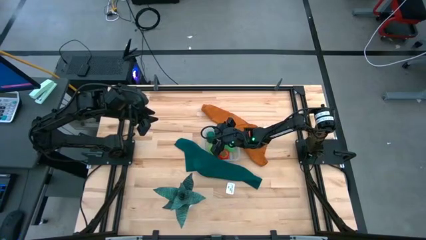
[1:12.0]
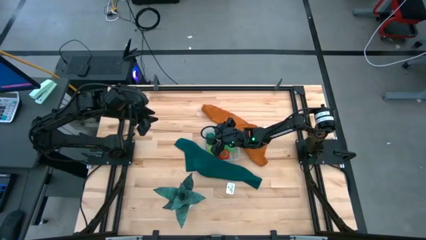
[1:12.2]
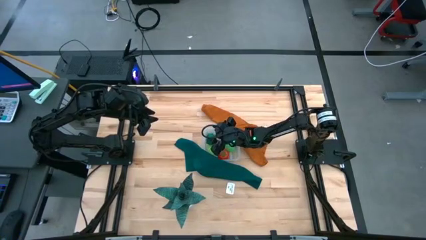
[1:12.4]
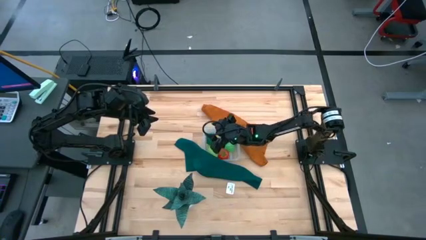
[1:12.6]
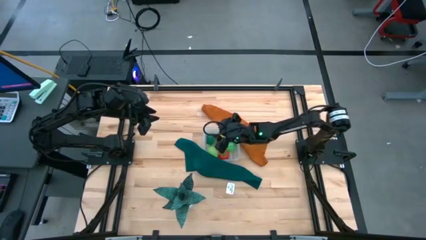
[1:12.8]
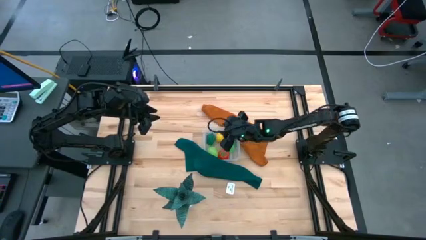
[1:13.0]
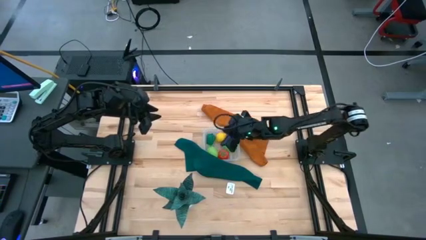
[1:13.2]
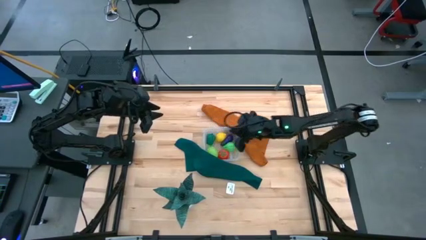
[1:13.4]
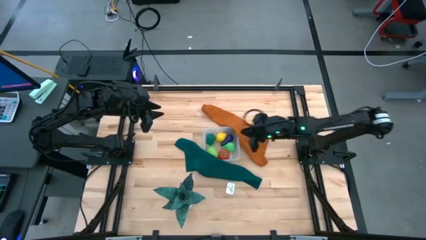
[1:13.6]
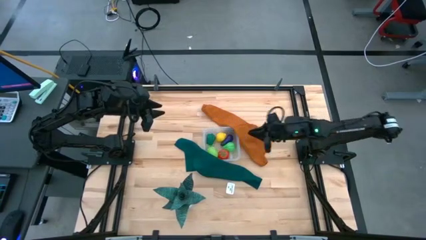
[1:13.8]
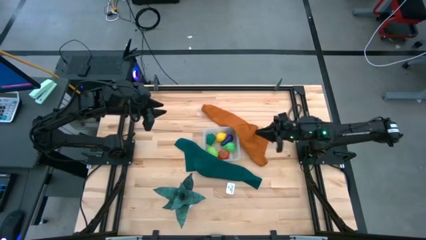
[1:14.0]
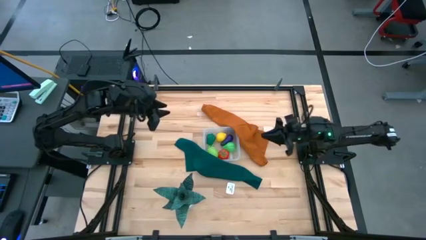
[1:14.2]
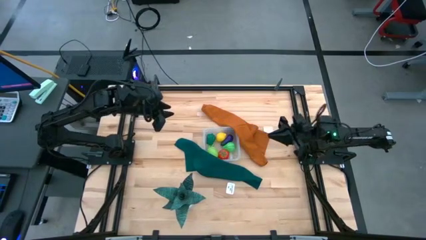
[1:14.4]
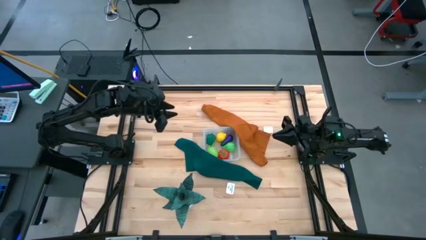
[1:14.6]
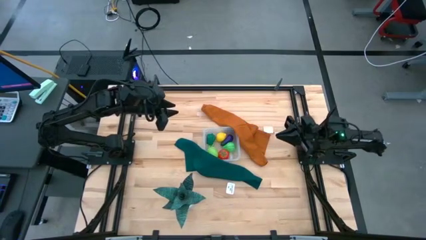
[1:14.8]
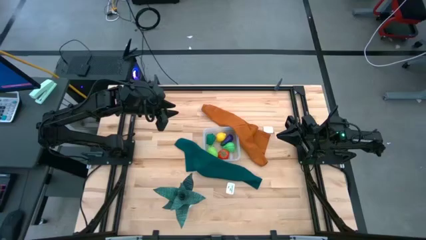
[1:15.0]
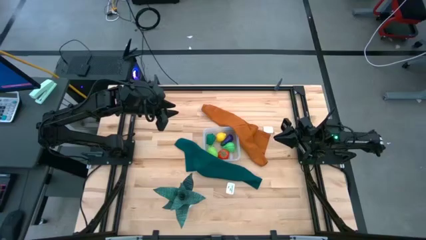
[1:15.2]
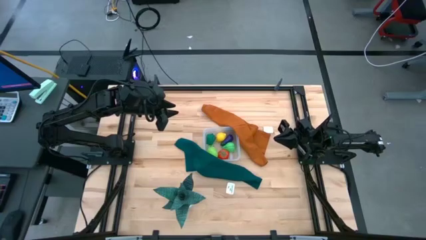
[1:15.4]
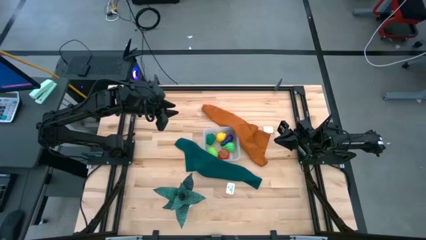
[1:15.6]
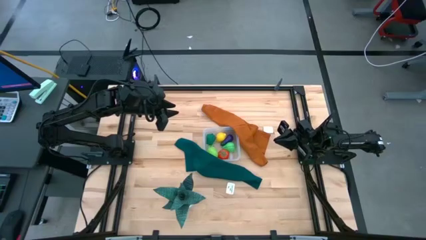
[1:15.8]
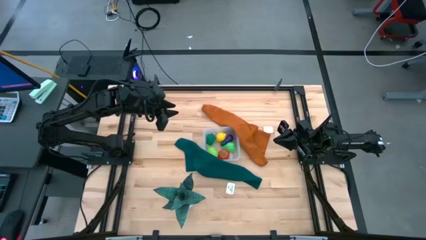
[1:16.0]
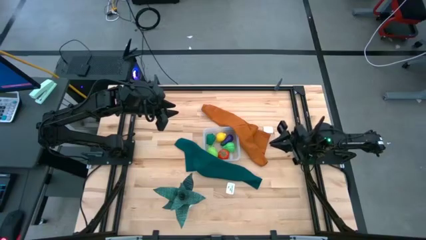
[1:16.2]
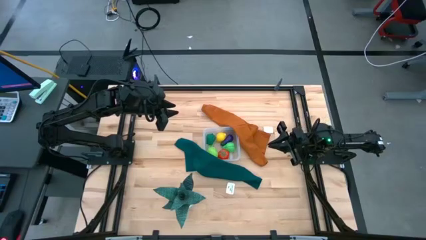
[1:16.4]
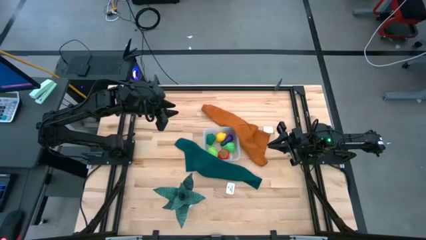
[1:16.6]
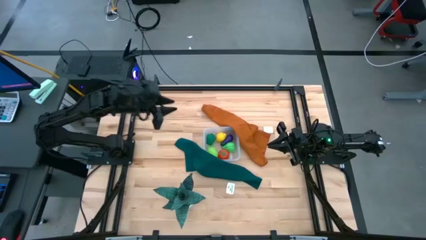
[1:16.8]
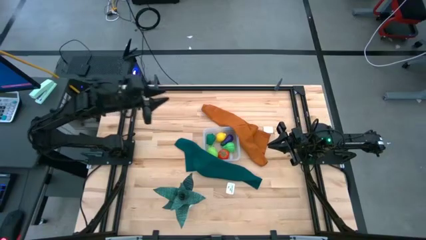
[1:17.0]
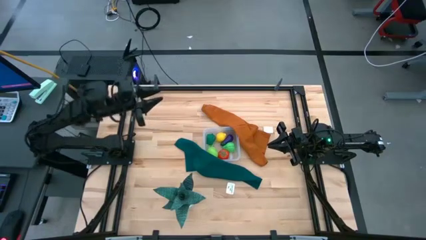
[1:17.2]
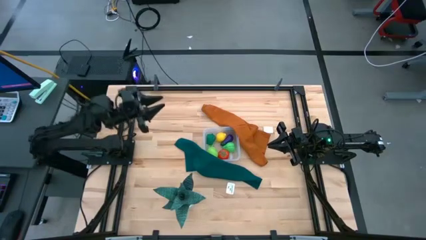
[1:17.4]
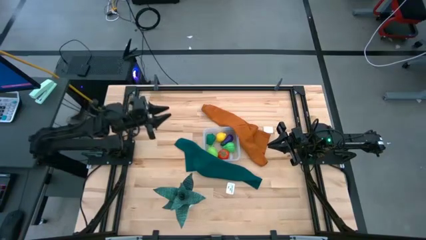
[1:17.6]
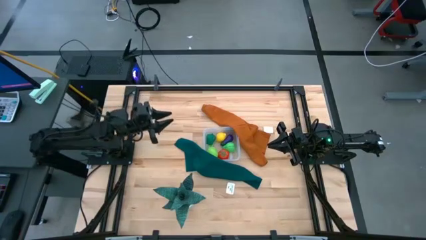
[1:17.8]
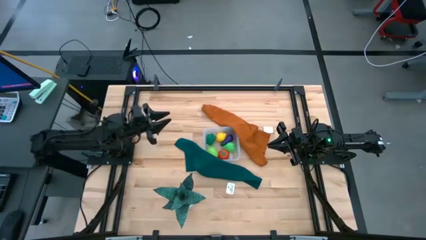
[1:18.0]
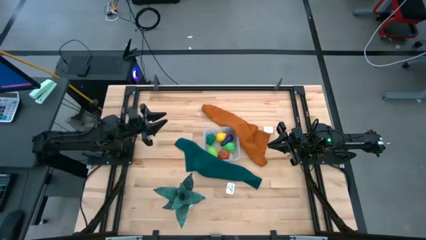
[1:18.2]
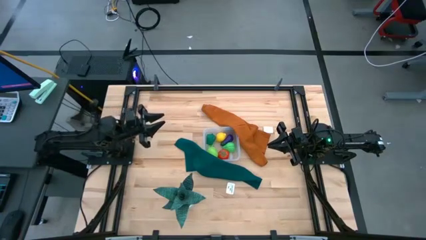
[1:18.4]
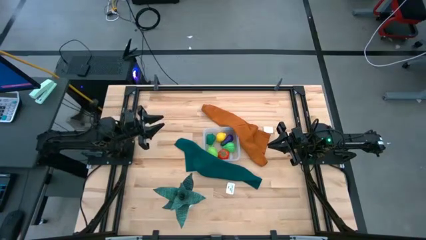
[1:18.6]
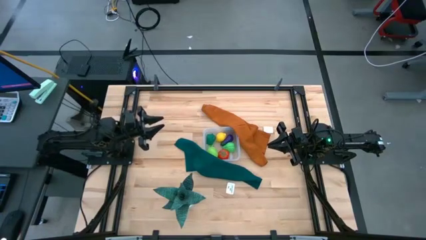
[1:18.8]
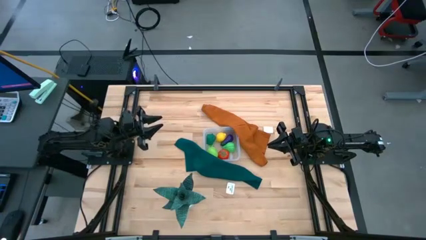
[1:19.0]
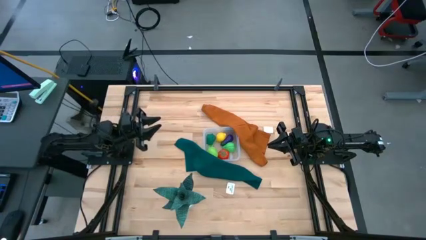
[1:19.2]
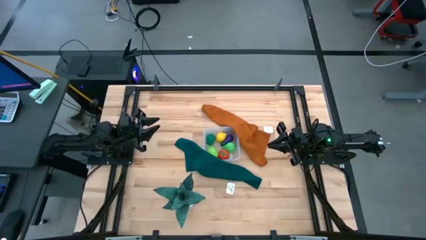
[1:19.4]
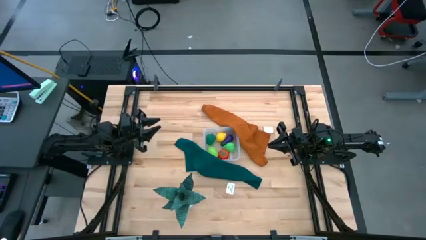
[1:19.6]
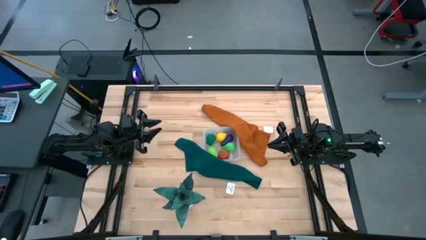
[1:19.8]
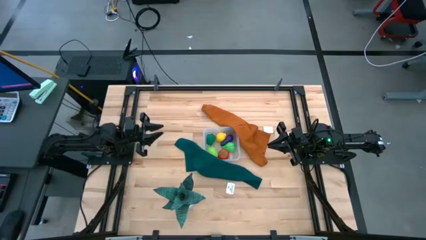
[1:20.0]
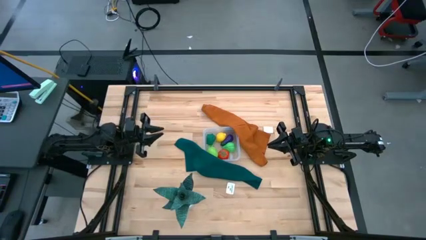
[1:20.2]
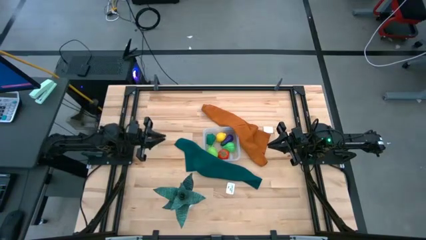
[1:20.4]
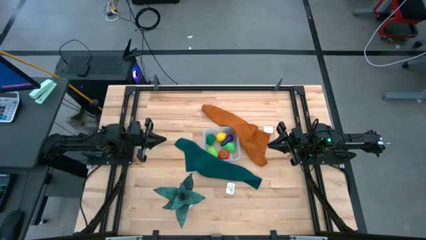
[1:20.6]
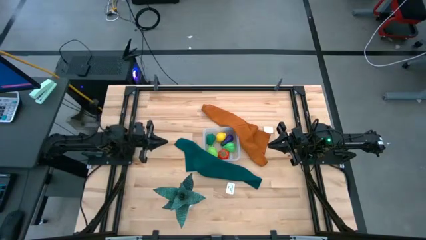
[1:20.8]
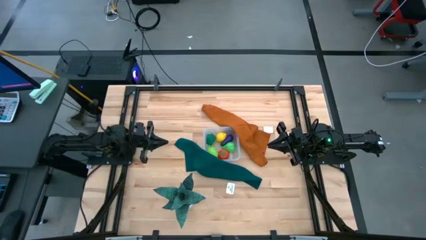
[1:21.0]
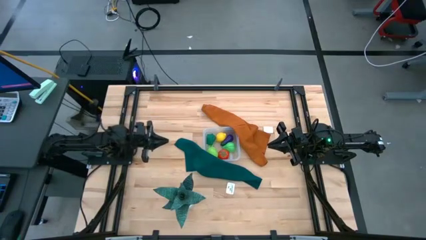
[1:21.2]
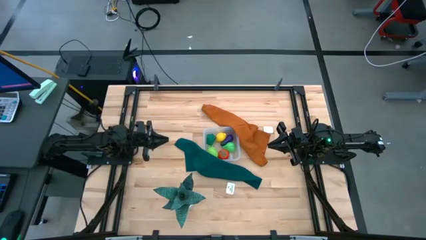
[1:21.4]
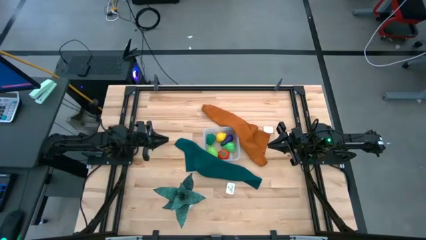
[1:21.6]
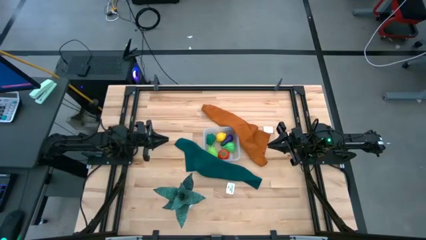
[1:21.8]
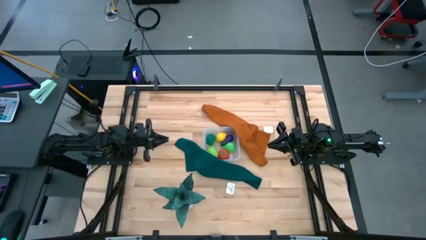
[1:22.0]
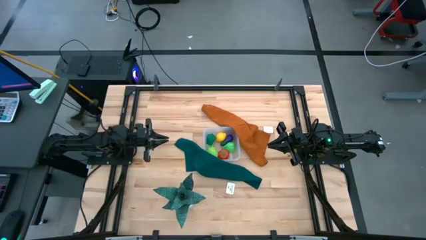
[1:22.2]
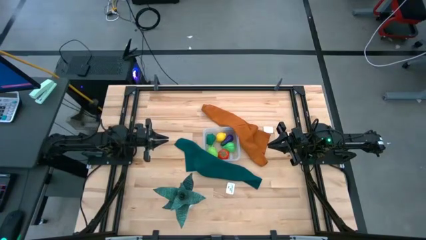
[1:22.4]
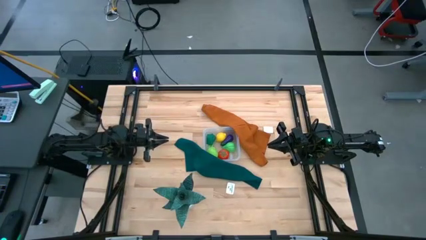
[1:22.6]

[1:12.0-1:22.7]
Task: Pick and placing Produce into tupperware
Return to Home Position

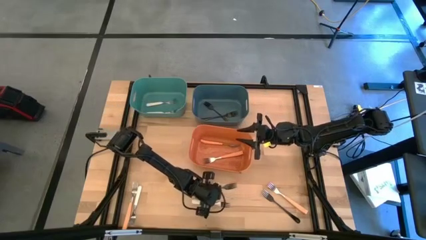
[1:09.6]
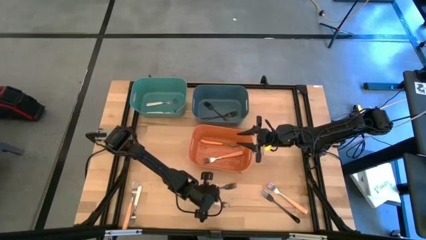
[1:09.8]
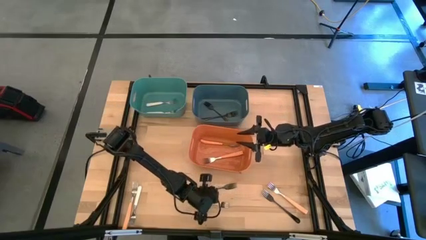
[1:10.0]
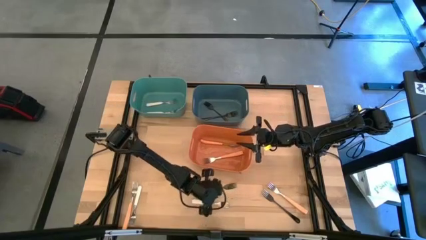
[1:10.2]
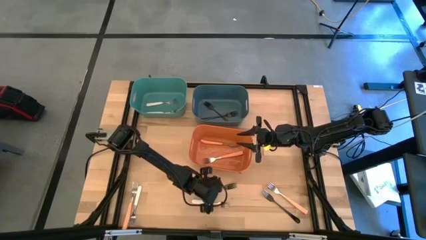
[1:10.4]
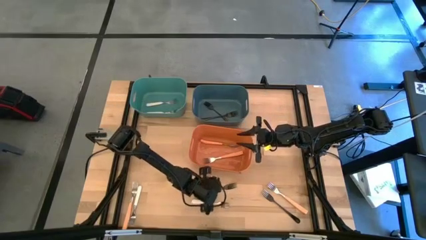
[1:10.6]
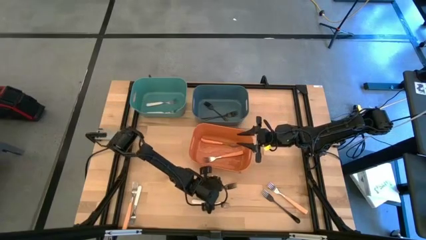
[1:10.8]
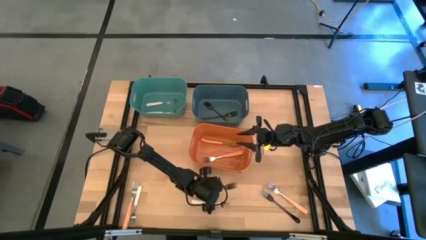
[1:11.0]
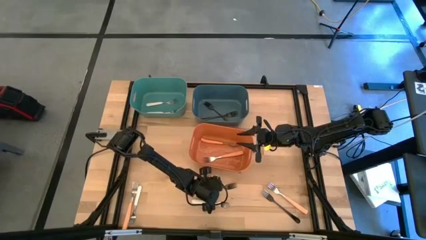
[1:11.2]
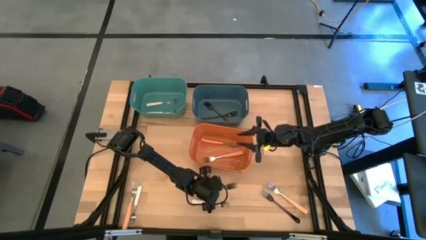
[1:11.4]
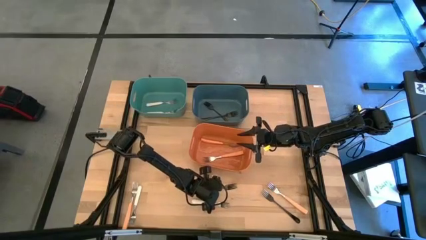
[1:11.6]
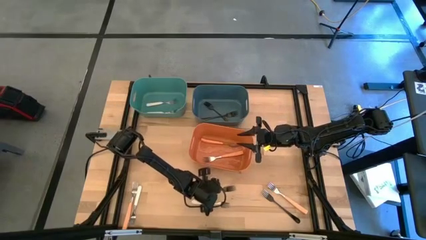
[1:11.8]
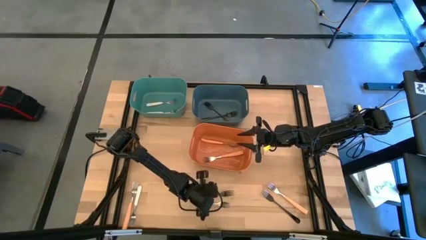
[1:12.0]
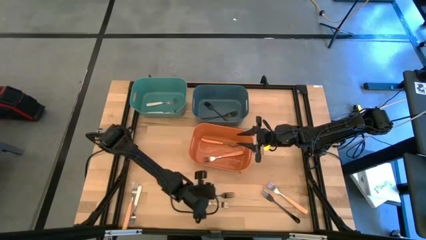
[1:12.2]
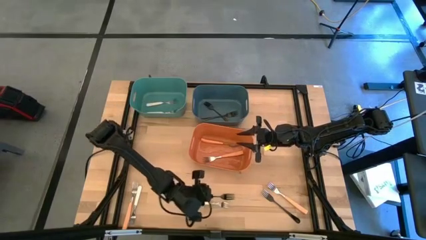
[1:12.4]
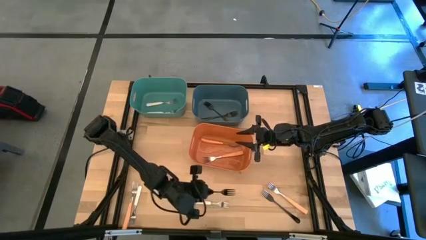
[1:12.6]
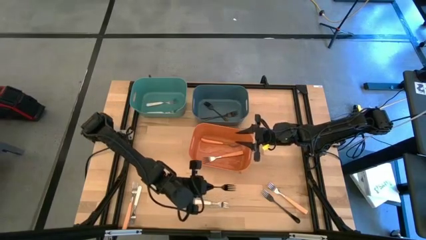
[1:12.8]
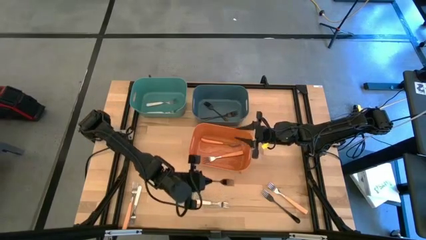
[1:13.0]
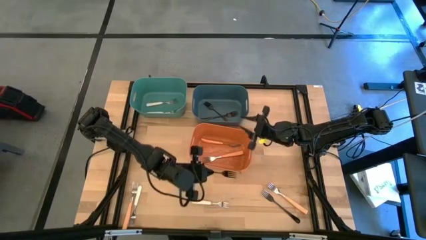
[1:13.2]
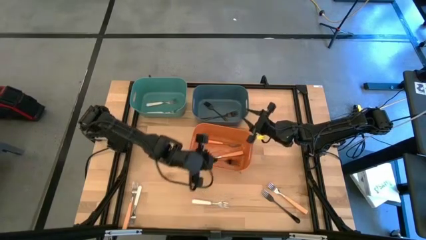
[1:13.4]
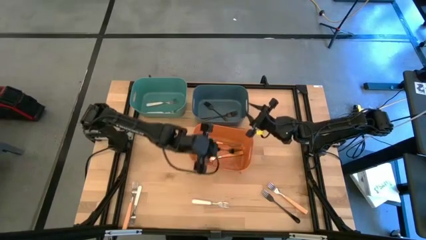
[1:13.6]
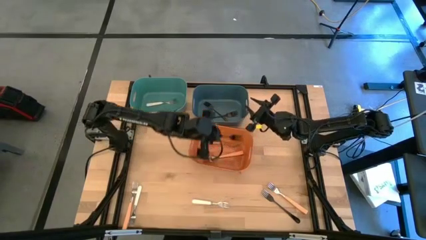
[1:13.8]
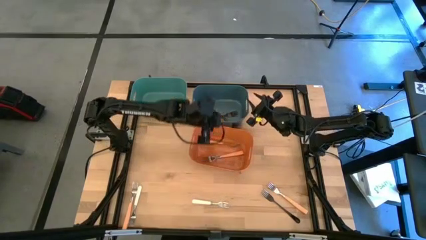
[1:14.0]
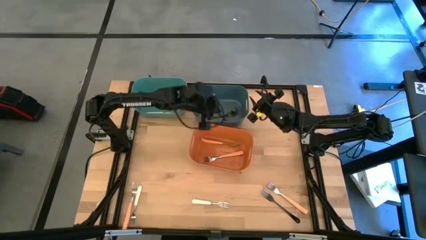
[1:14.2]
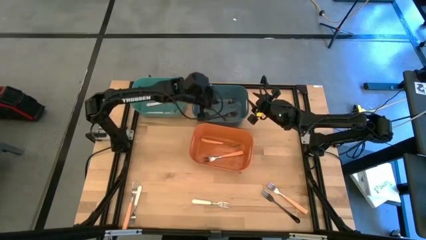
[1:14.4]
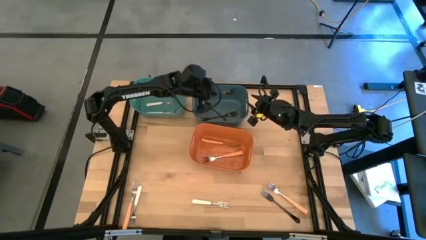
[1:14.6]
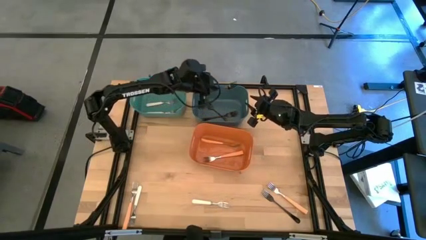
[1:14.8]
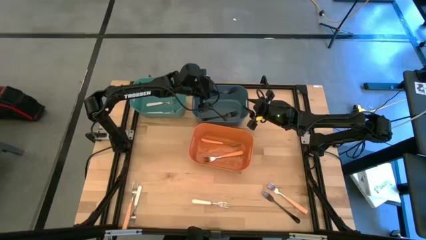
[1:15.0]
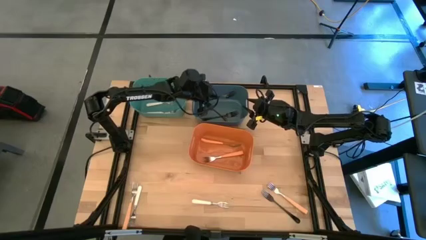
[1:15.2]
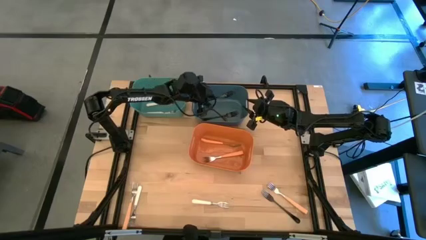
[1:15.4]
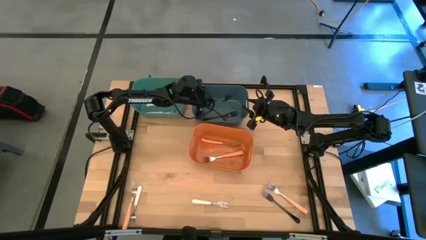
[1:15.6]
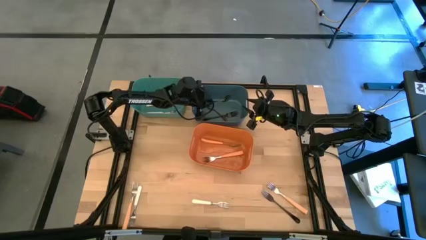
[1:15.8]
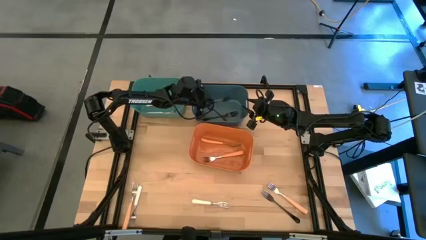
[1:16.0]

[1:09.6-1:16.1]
Task: Sort silverware by color (type)
Put the black fork into the blue bin
